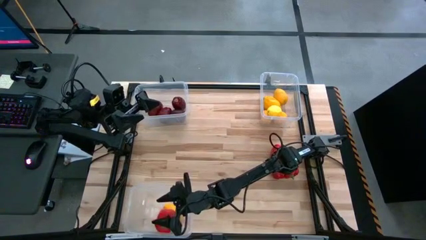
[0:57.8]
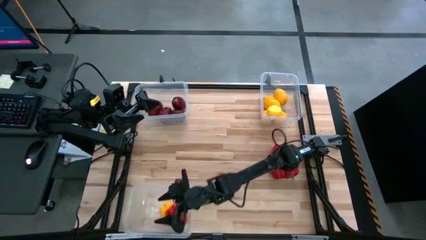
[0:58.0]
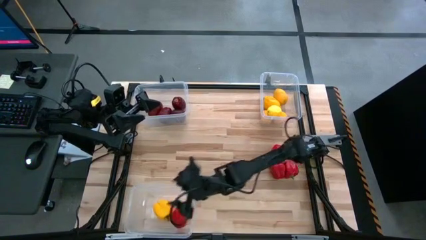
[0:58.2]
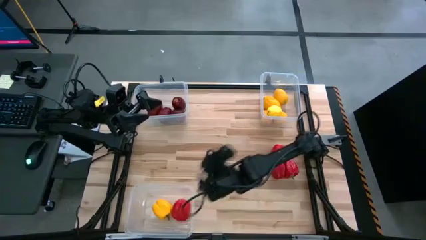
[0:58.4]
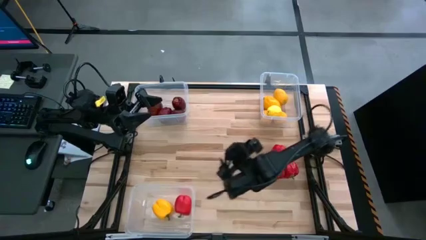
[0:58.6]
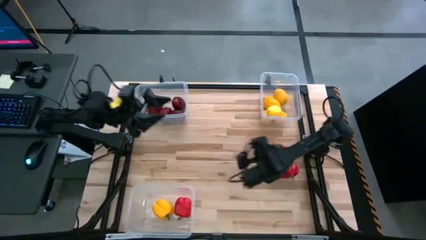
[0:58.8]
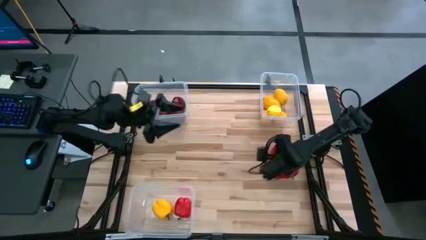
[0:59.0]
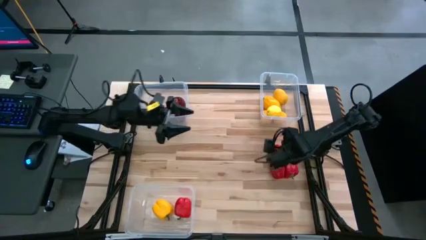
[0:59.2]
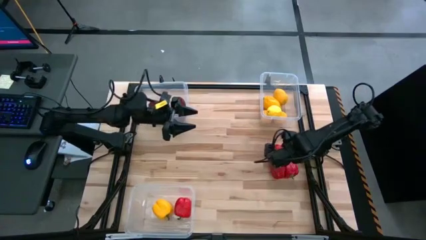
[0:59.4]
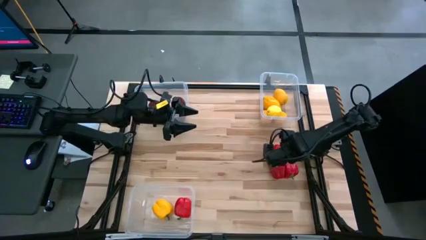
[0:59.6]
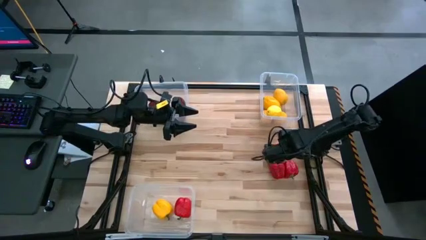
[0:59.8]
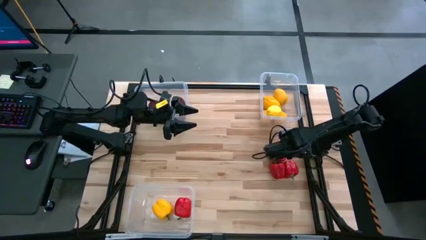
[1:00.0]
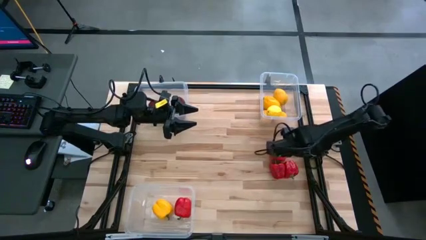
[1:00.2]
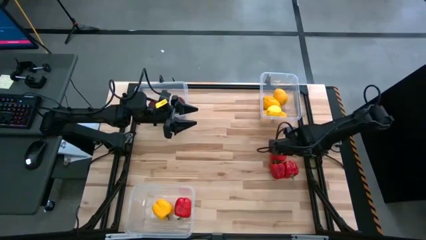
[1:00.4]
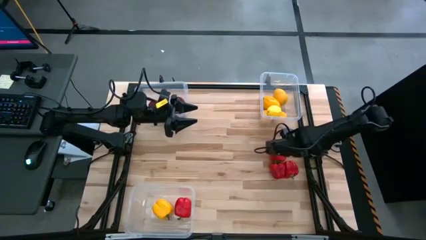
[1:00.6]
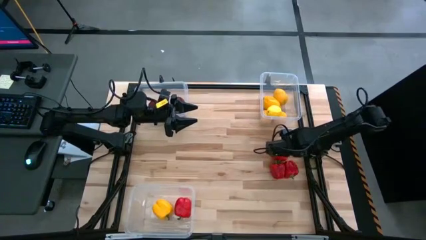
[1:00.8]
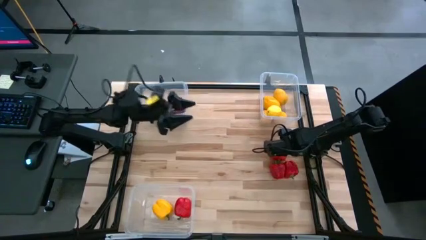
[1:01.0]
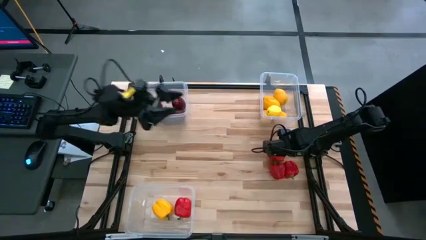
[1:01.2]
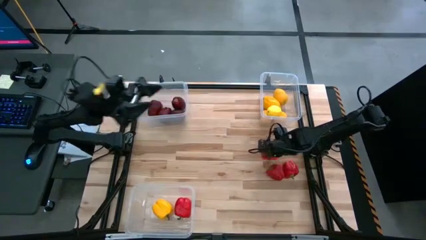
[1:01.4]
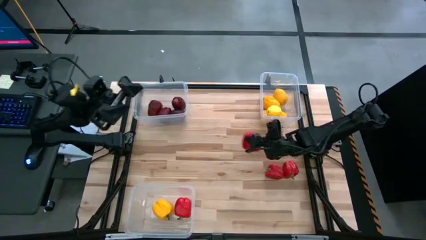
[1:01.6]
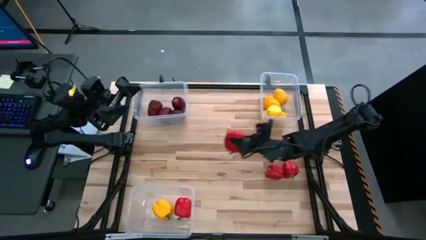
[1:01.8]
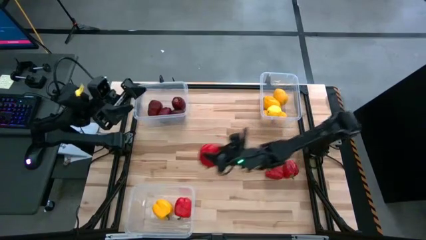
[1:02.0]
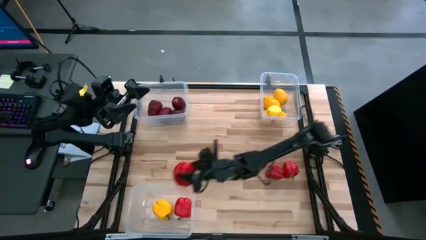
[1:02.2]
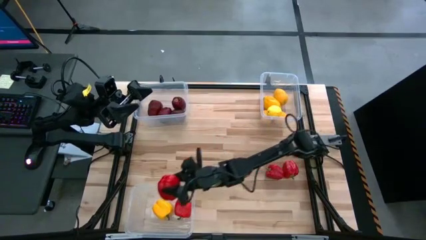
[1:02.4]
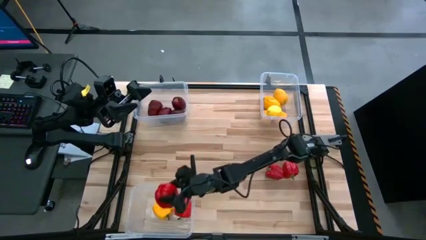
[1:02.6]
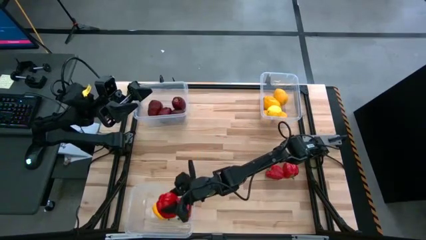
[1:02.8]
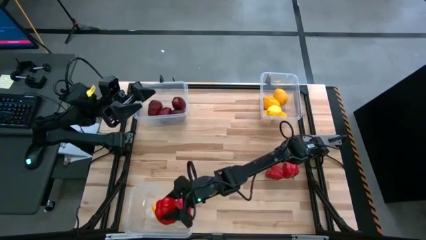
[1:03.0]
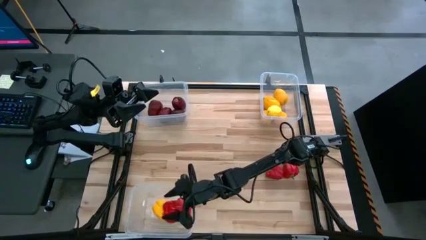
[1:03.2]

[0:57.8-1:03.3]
Task: Sort produce into baskets
Put the red bell pepper into the bottom transparent bin

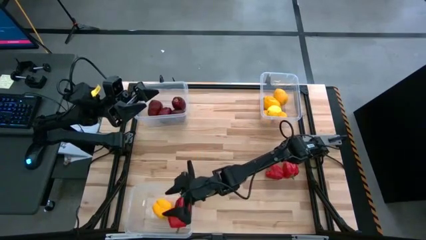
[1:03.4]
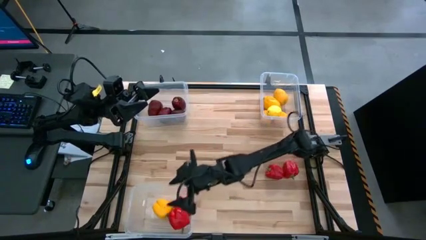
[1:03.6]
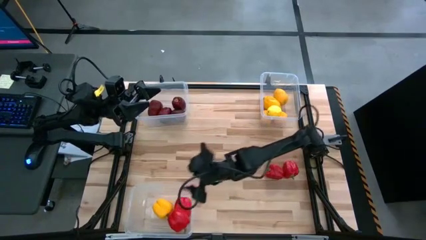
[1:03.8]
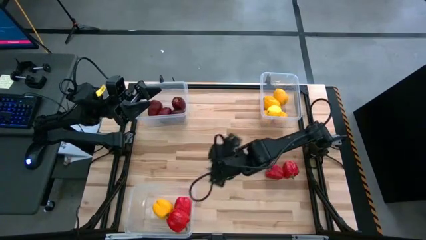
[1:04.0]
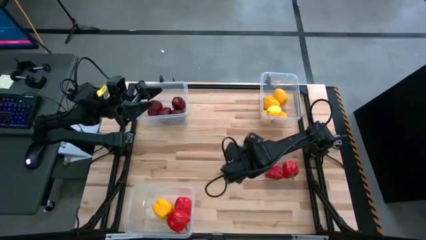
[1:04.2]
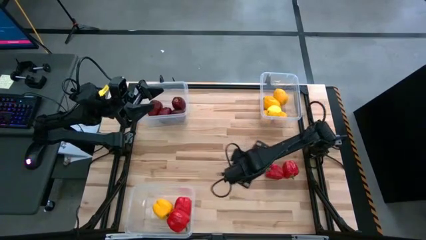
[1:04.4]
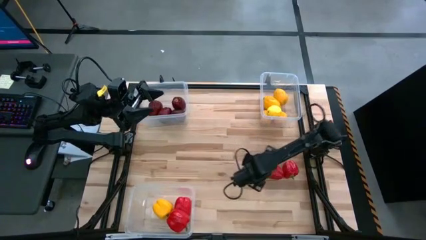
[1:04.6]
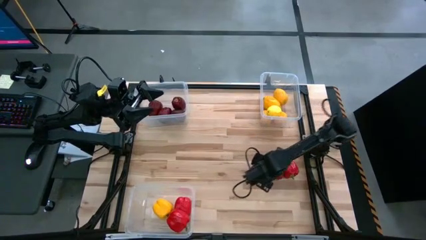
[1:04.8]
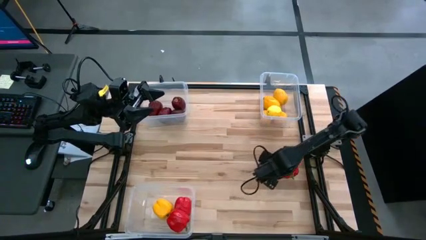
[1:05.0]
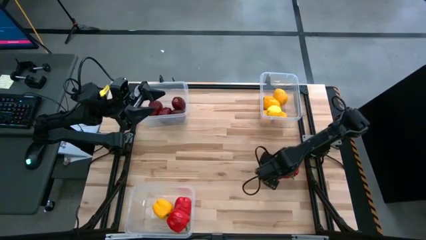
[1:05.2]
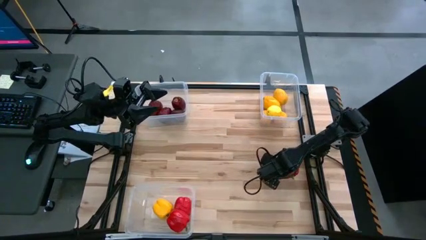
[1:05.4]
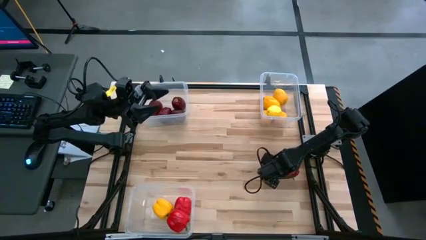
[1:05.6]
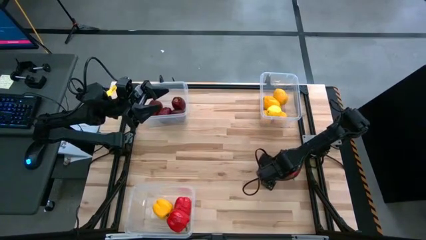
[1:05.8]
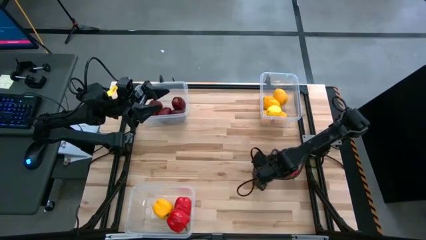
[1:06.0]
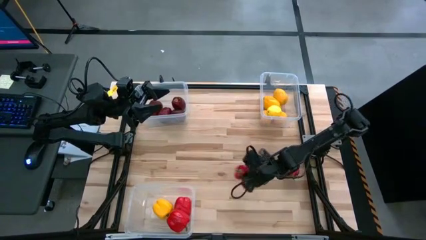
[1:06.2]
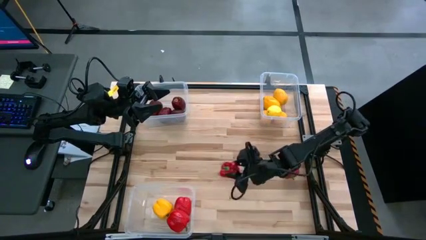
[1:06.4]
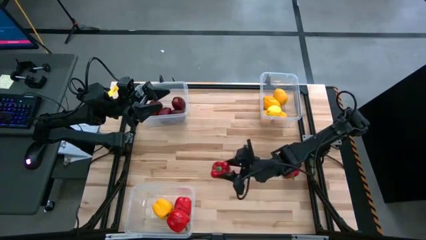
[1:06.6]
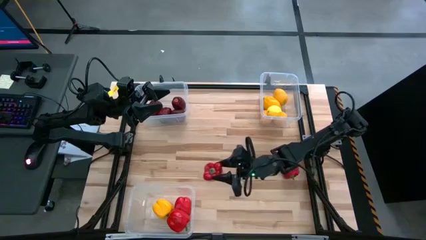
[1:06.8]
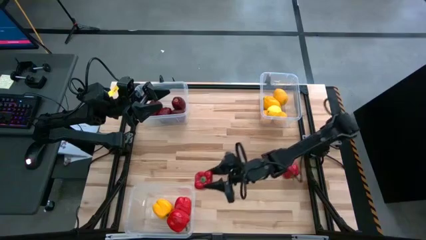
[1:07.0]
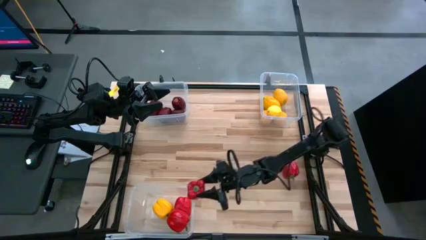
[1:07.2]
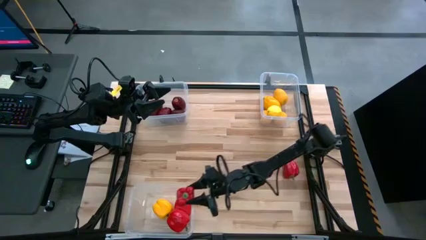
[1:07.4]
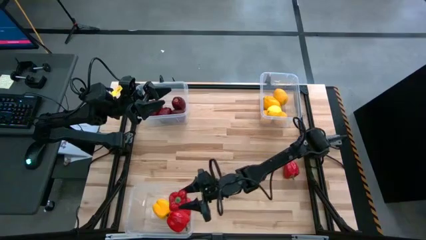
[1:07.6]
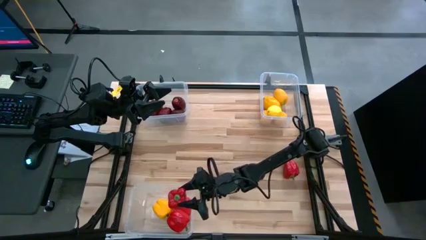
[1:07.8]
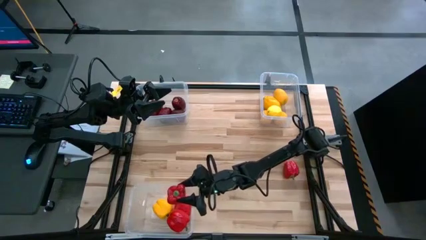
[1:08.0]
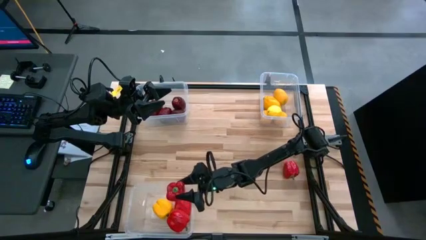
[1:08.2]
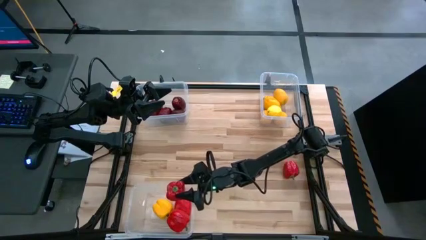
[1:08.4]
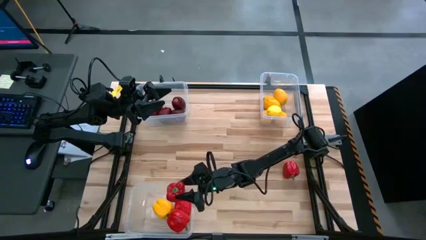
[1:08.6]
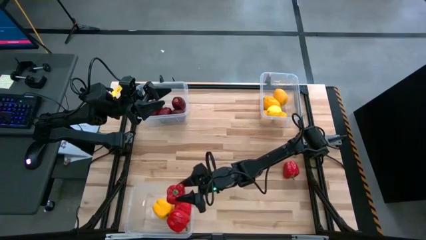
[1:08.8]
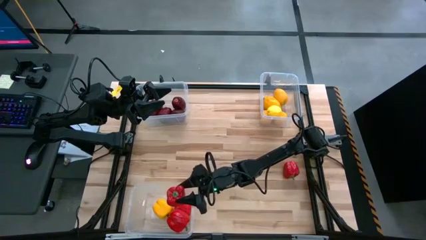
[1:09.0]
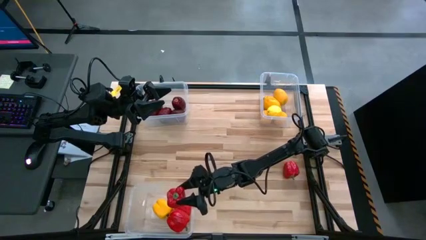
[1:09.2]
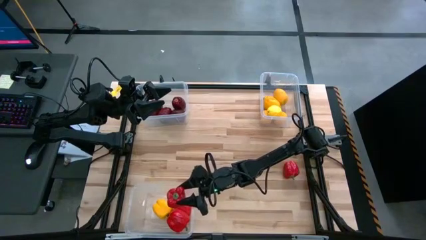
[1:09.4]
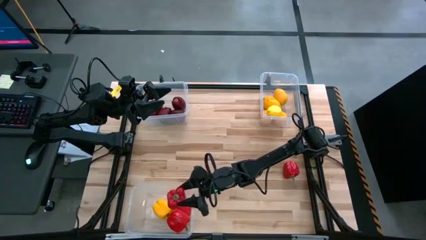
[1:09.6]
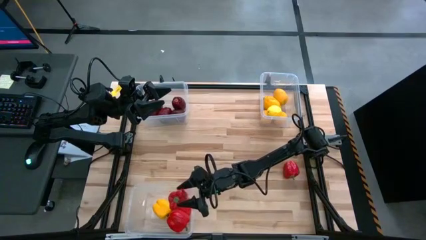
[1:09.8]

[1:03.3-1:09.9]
Put the red bell pepper into the bottom transparent bin

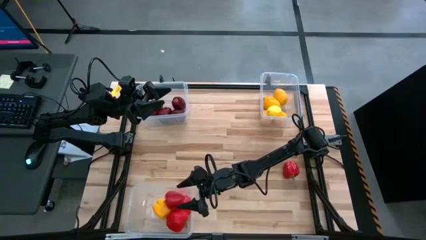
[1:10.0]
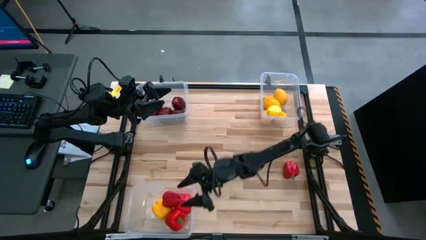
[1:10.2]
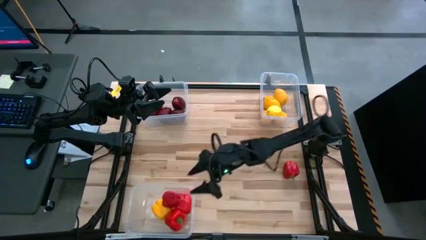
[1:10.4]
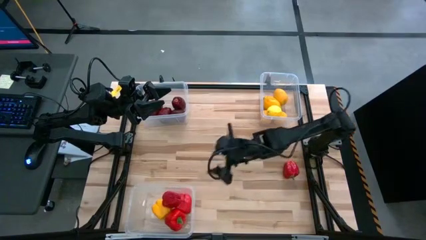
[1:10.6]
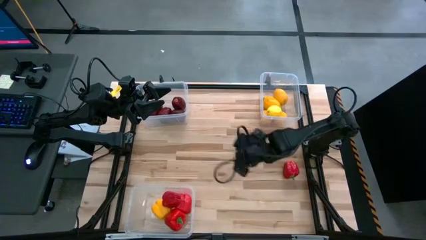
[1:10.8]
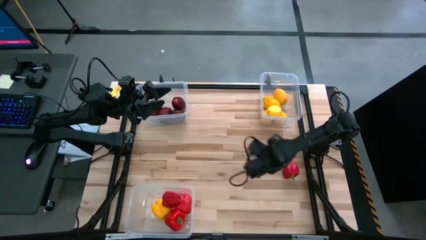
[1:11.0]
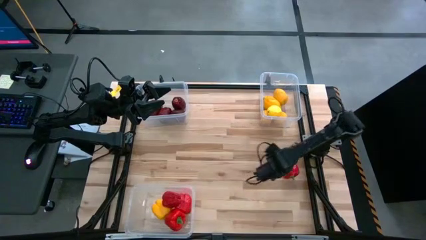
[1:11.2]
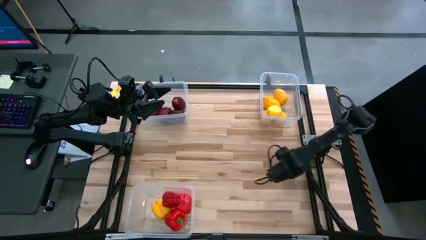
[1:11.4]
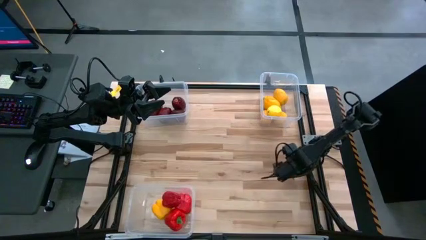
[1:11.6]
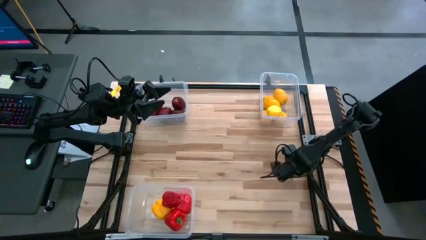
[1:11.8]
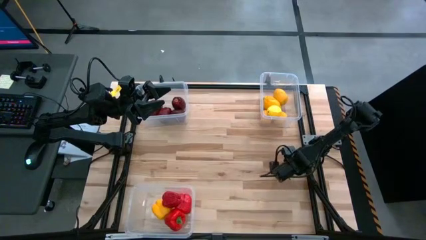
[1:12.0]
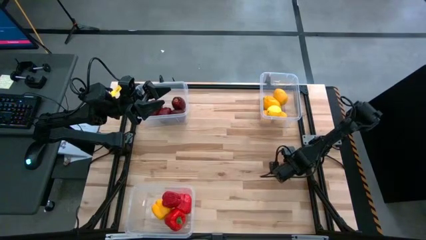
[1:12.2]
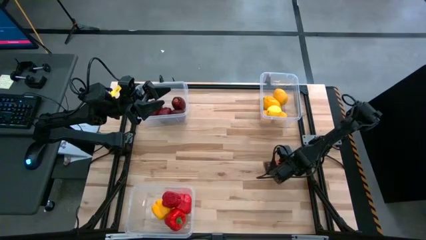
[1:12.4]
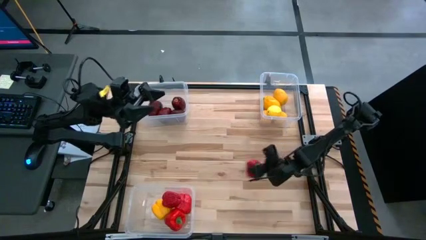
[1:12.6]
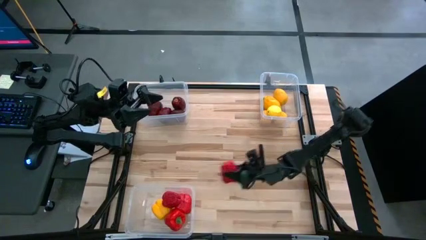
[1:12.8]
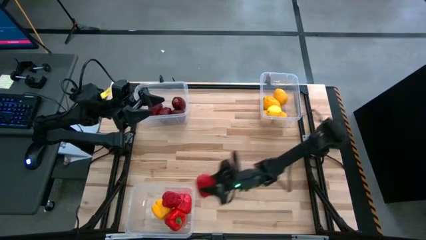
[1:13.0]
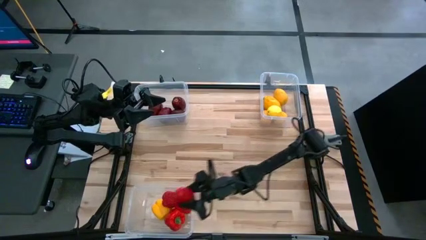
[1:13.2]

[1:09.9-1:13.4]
Put the red bell pepper into the bottom transparent bin

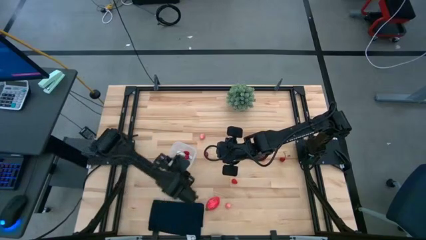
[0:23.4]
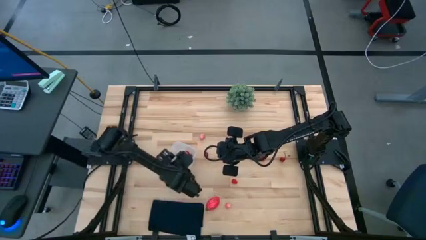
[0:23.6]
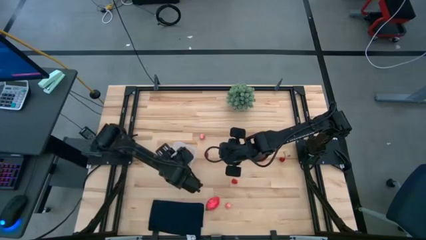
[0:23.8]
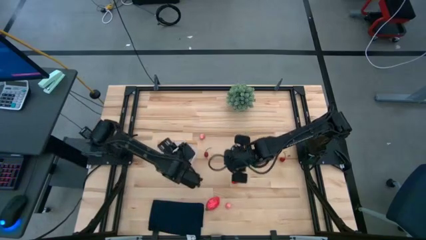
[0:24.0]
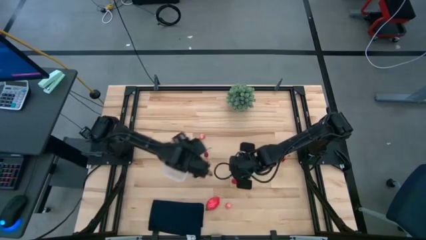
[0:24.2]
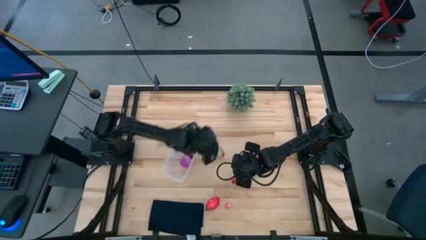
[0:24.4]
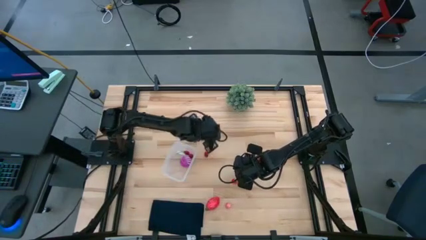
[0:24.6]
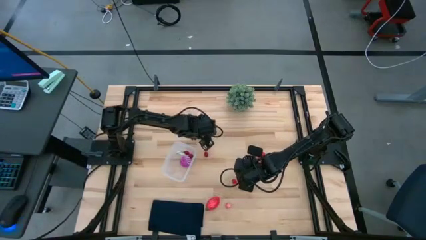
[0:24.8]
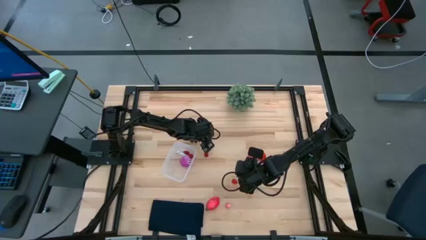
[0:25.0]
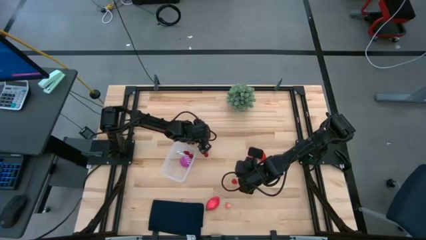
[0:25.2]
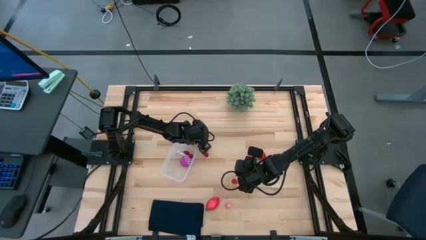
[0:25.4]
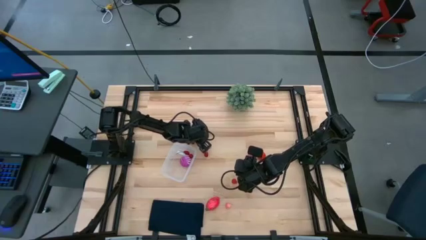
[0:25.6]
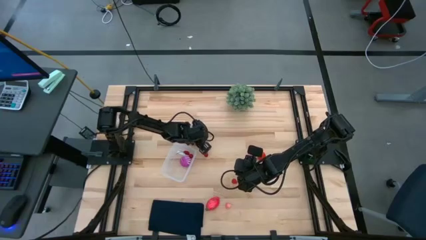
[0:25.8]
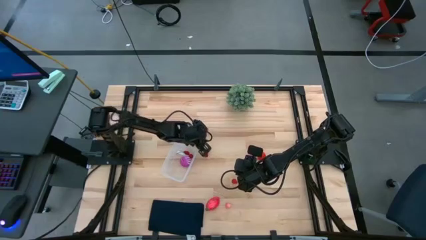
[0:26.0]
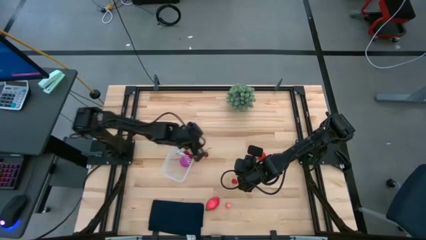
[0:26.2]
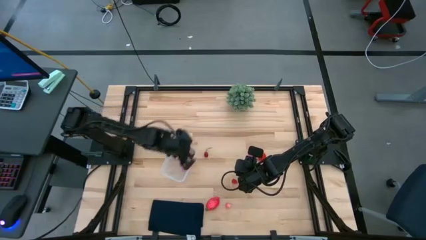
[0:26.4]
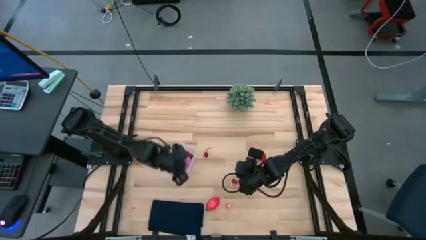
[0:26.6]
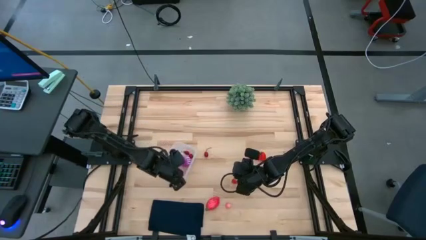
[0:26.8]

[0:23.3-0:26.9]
Task: Pick and placing Produce into tupperware
Put the pink peach into the transparent bin
